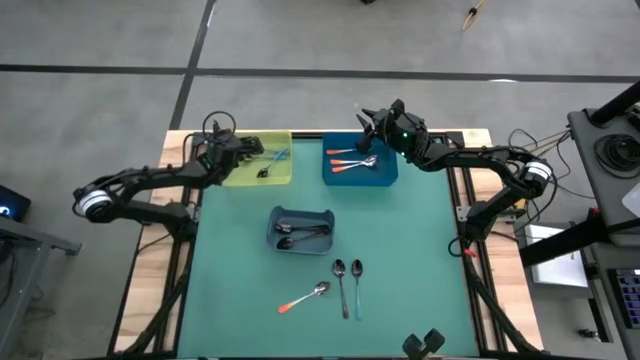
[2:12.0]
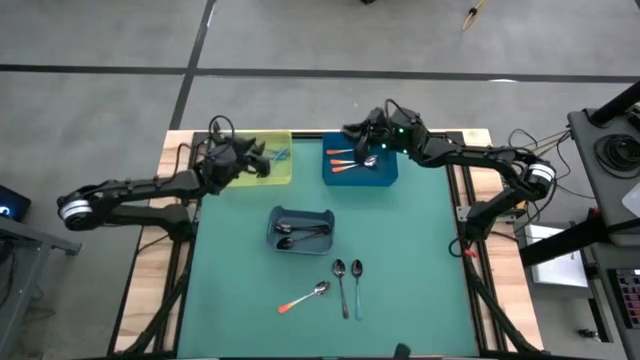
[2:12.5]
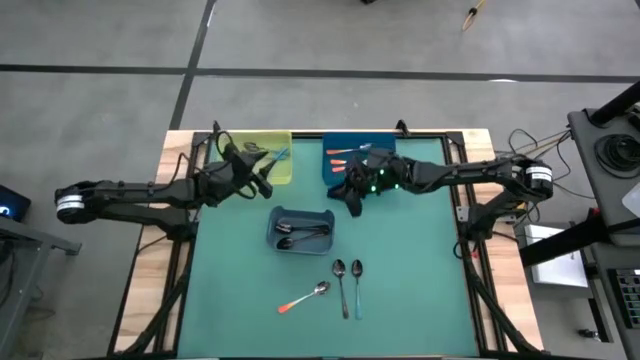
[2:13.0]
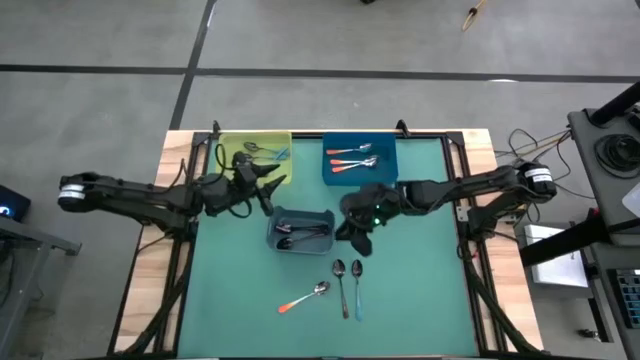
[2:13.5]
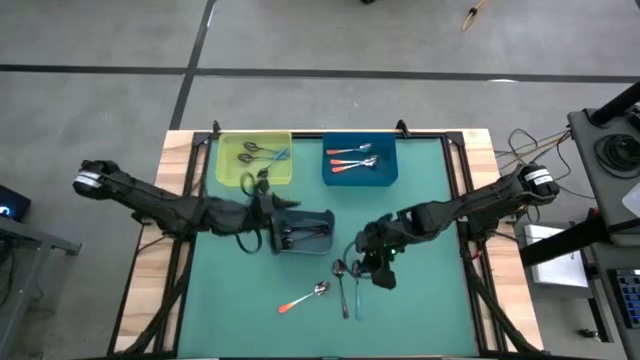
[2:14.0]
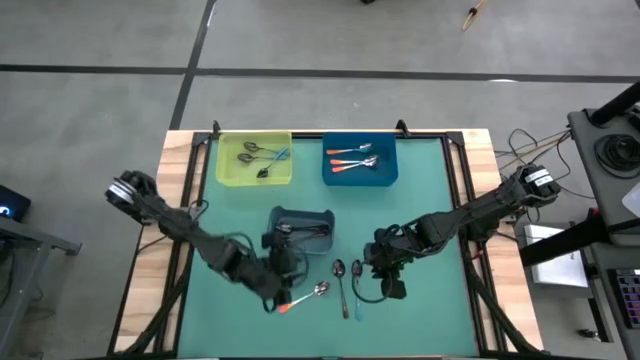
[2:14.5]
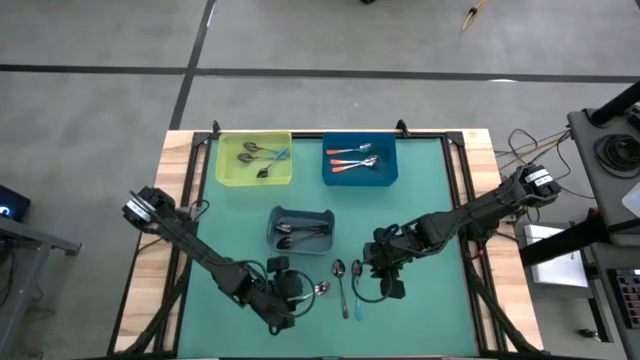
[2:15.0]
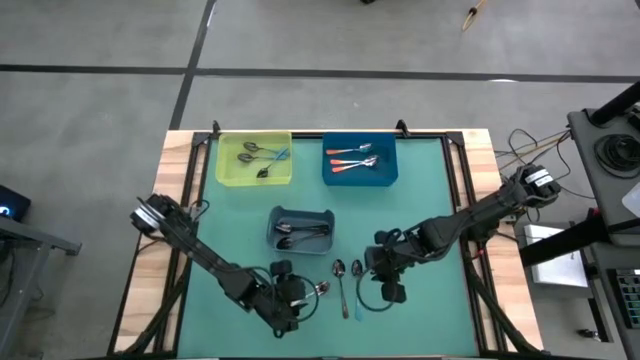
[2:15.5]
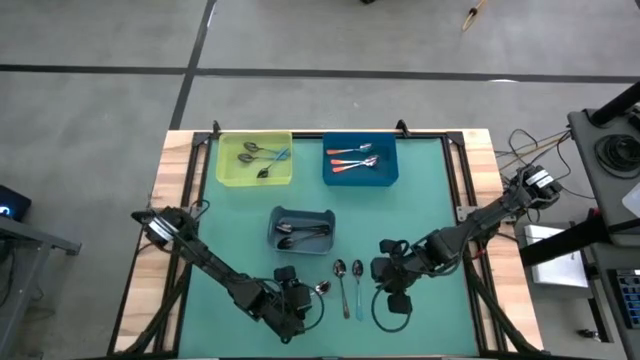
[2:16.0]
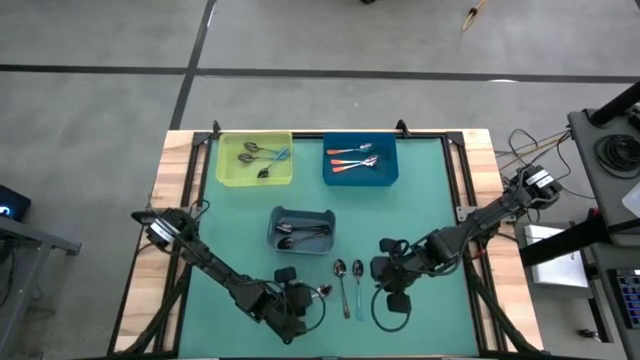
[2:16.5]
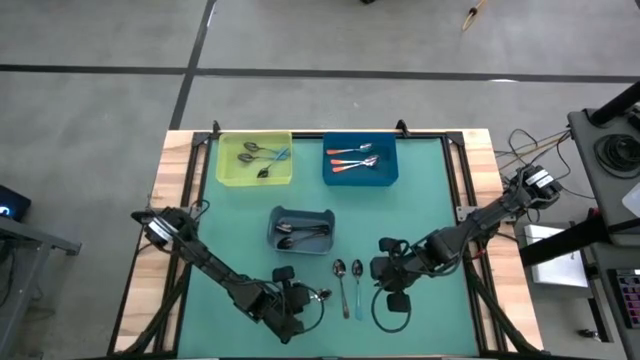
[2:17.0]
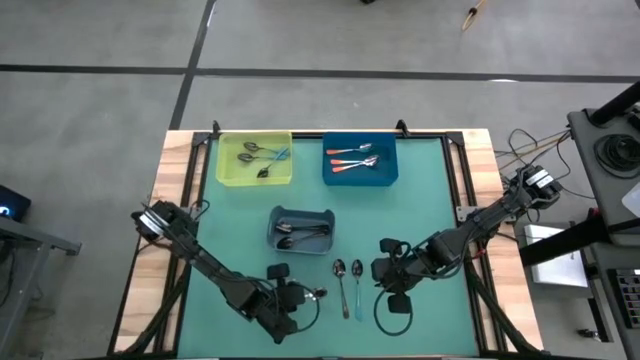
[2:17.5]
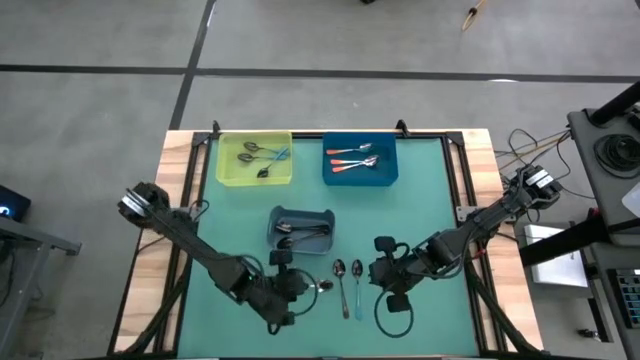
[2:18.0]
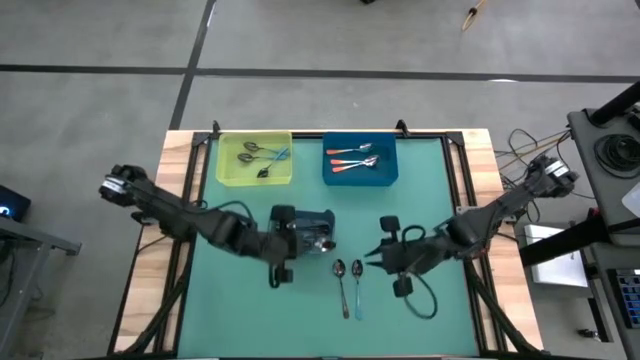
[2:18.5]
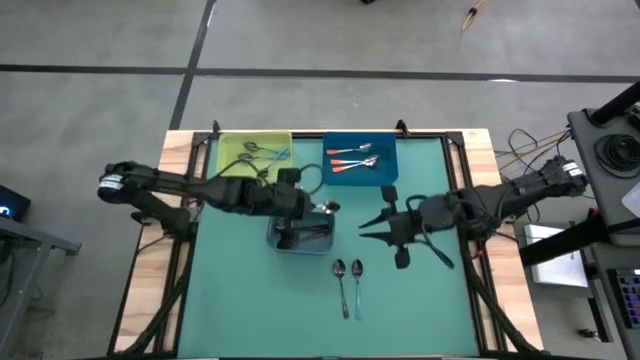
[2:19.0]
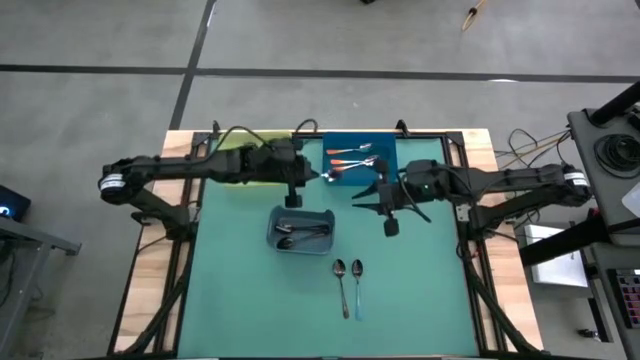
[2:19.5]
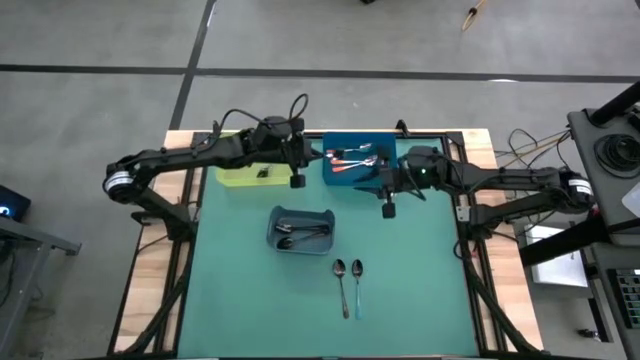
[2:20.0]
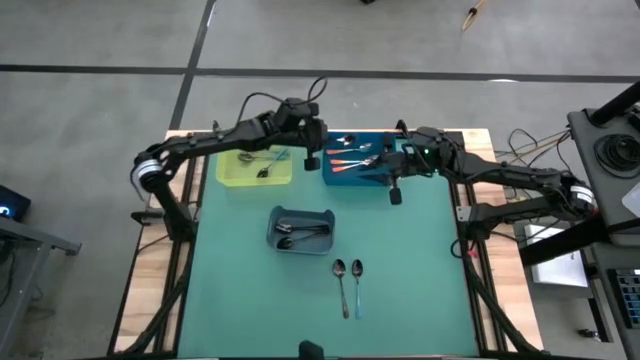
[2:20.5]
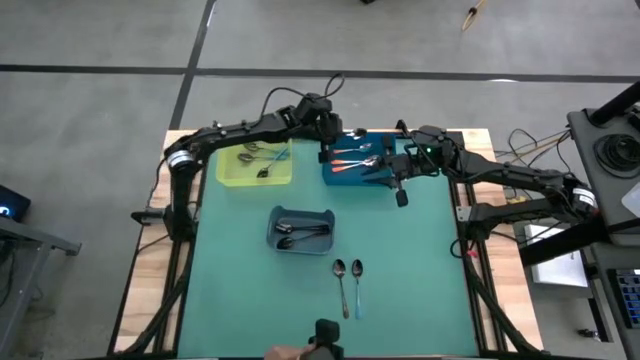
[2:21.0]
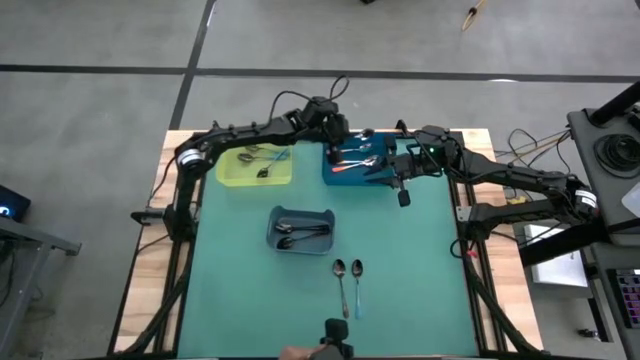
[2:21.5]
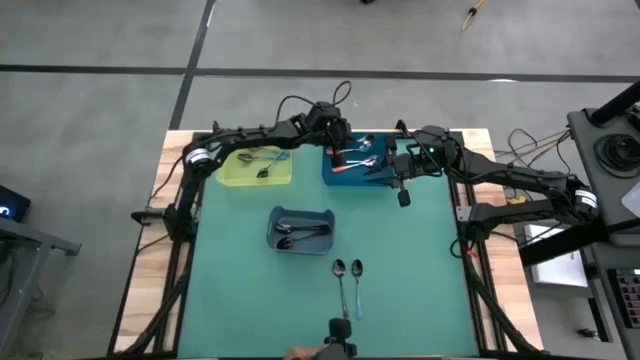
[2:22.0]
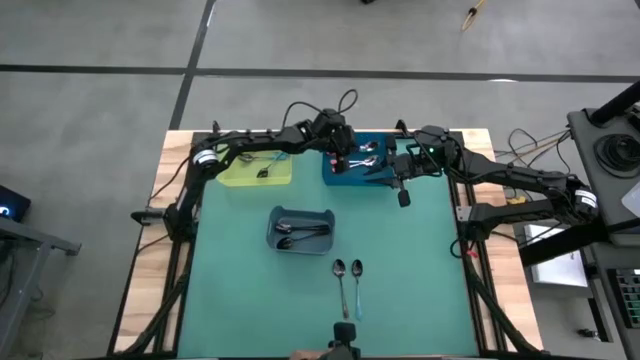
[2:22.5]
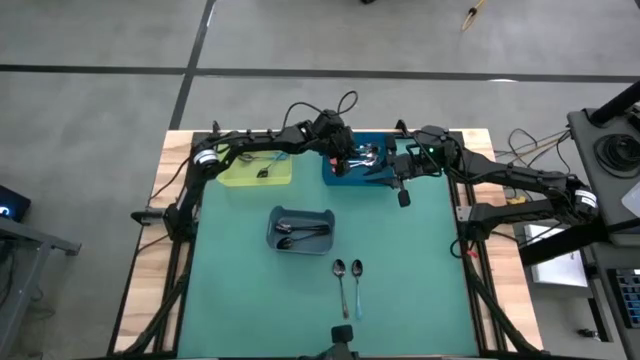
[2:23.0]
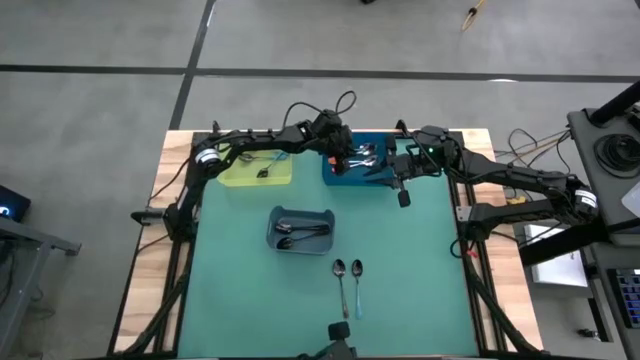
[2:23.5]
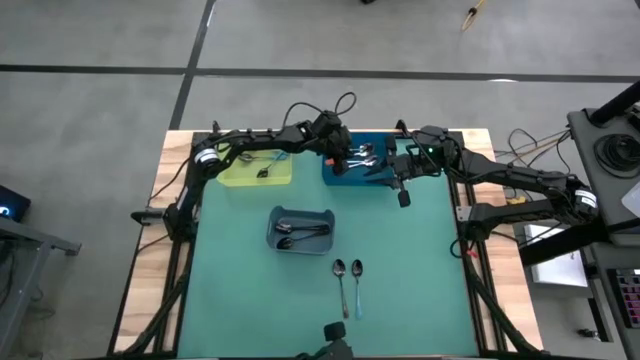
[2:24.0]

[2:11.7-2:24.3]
Task: Sort silverware by color (type)
Put the orange spoon into the blue bin

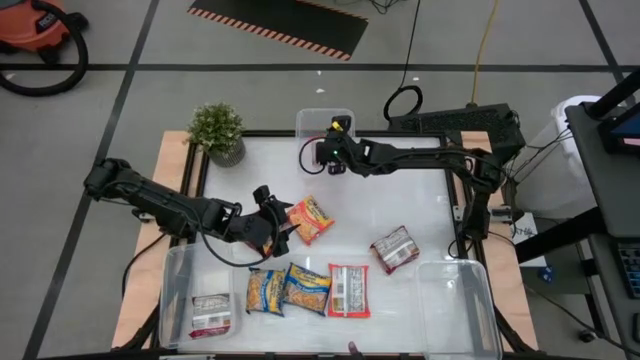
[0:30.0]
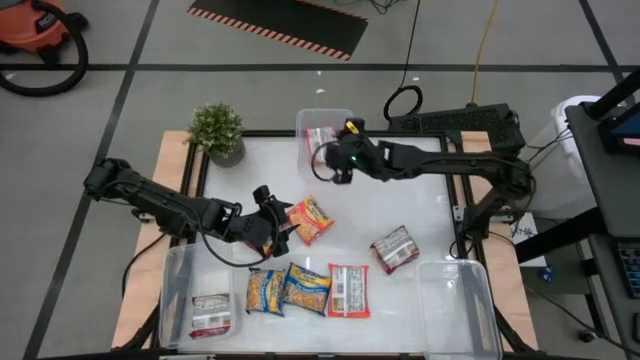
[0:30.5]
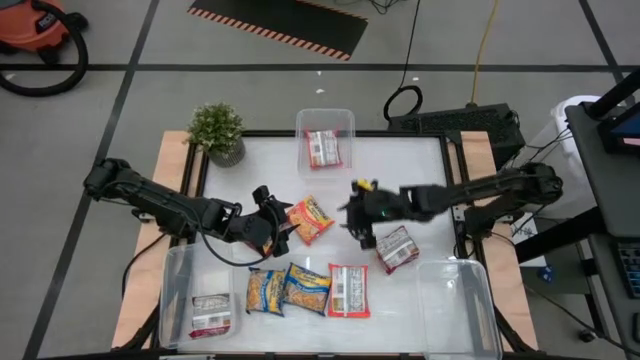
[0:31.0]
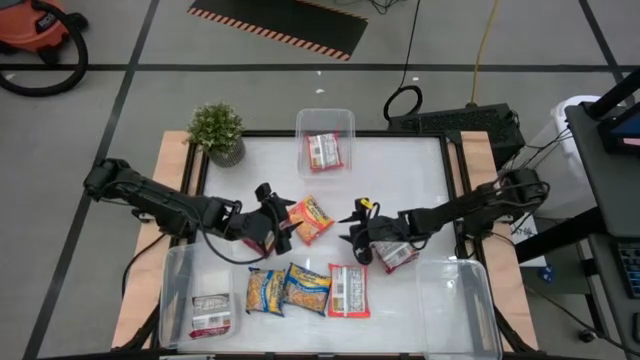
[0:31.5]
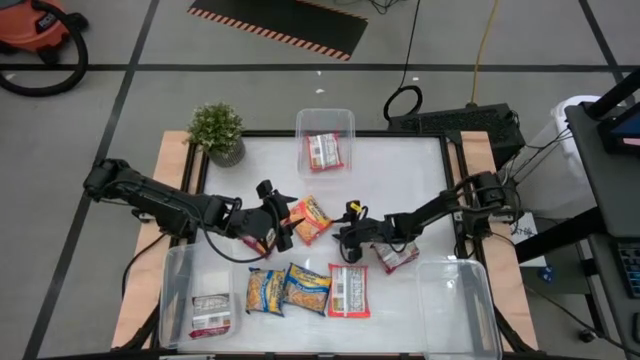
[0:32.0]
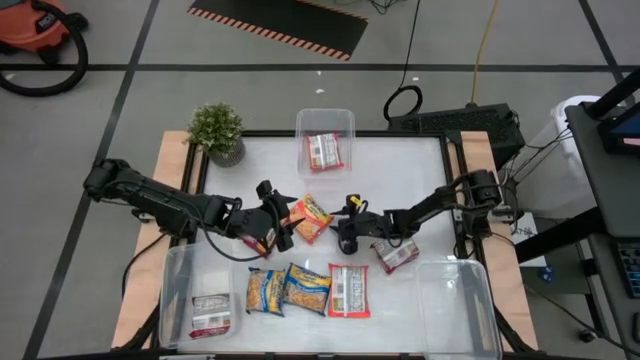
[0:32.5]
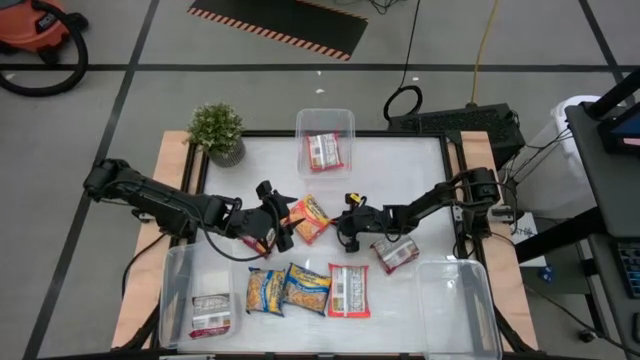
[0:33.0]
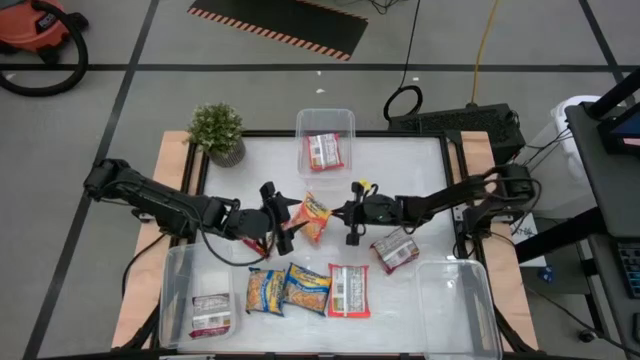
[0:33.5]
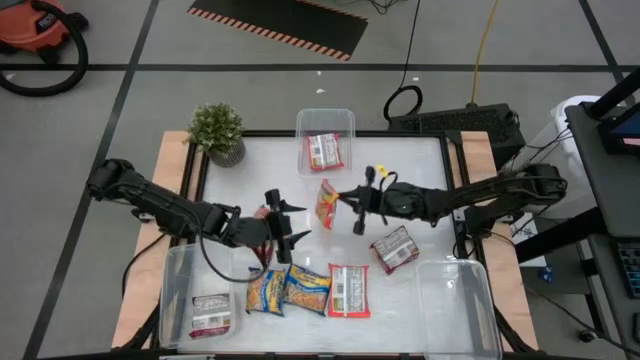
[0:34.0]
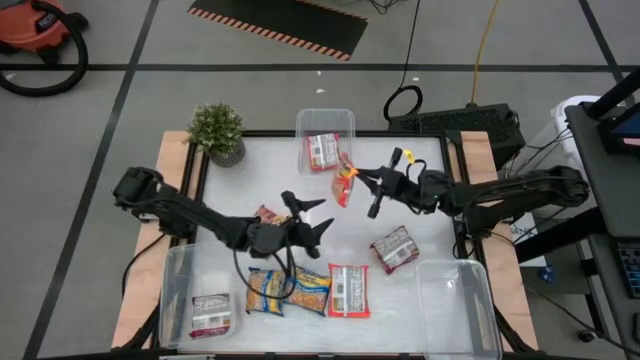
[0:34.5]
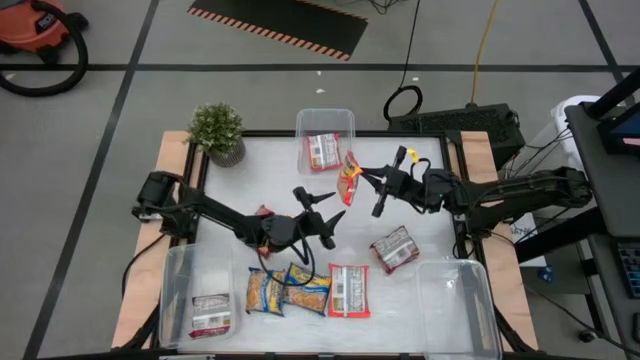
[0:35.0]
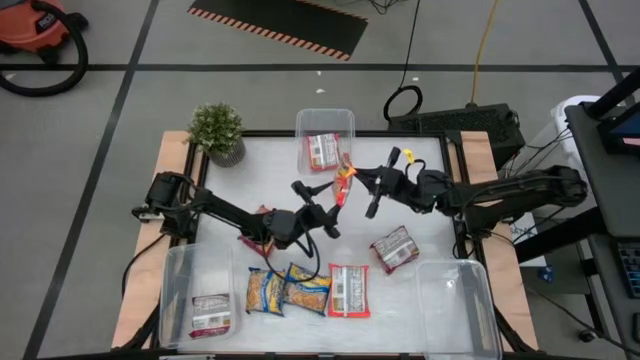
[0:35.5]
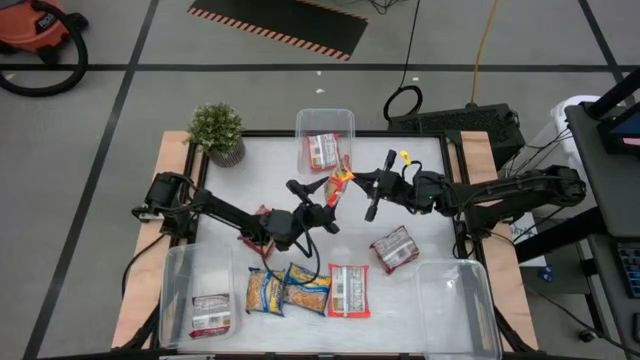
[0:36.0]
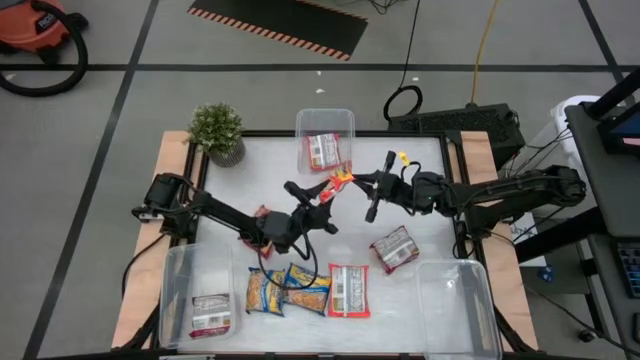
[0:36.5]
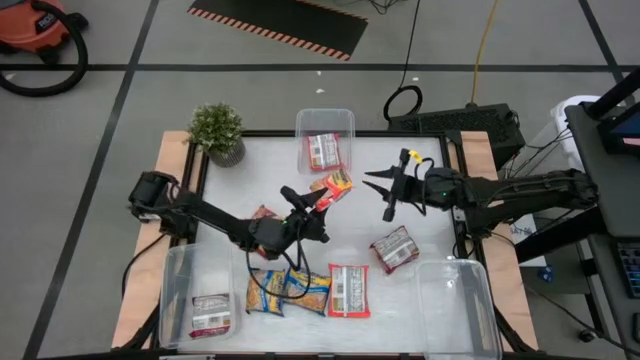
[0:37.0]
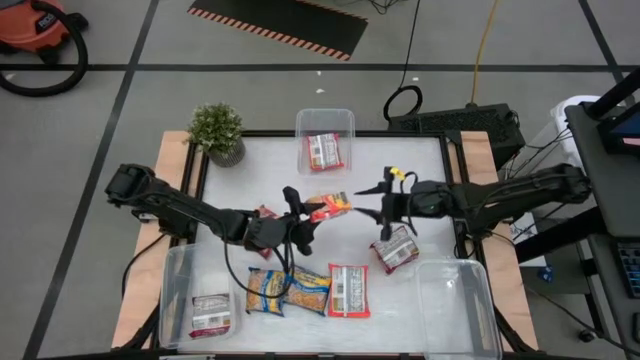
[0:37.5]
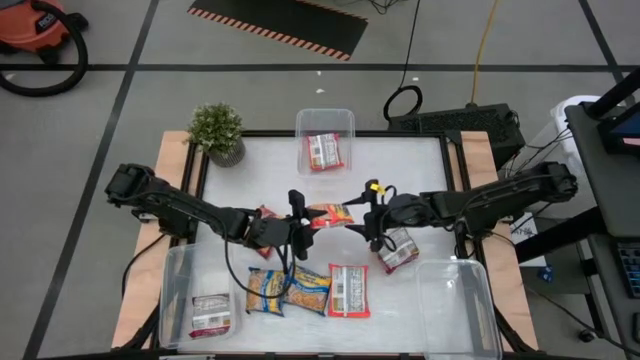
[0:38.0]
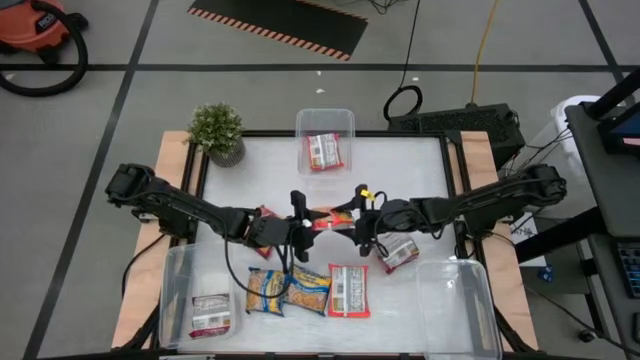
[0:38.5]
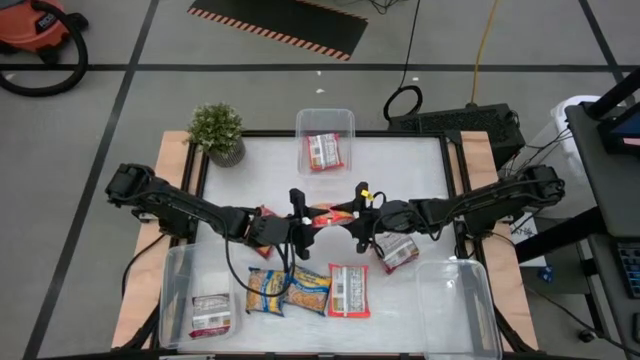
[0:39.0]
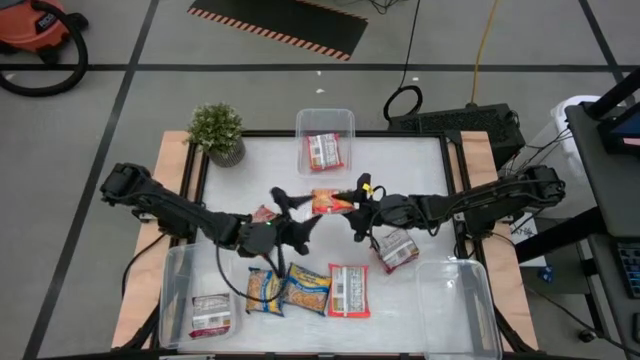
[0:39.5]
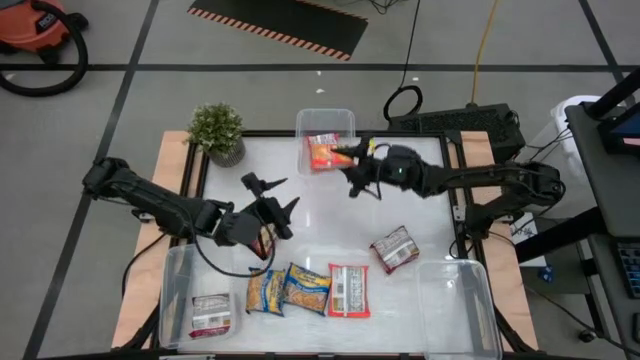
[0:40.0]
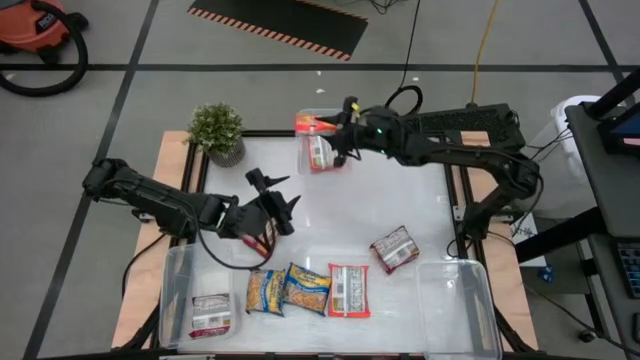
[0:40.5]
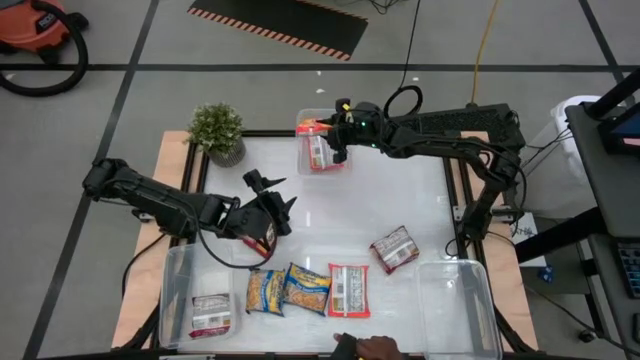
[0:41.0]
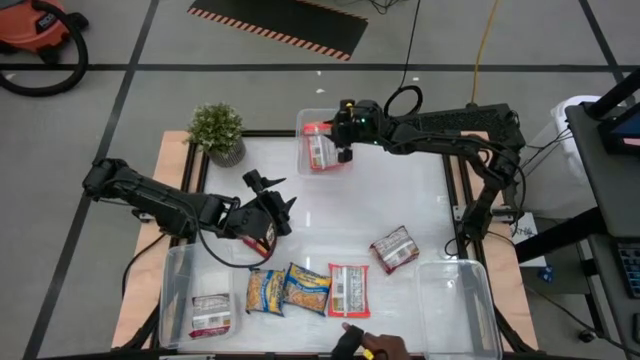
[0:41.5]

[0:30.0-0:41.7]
Task: Sort Maruchan noodles
Put the top orange noodle pack into the top transparent bin
